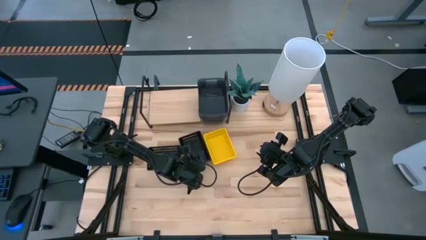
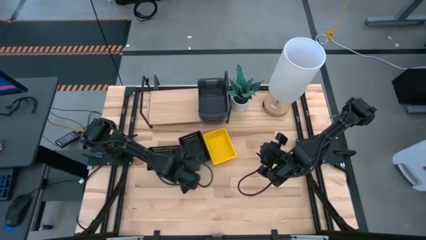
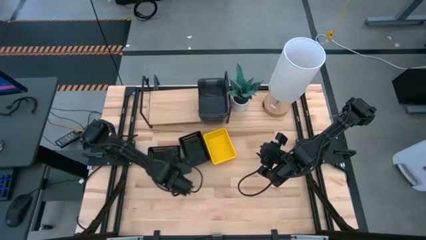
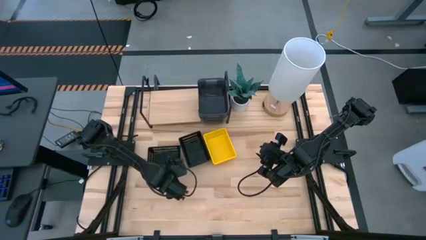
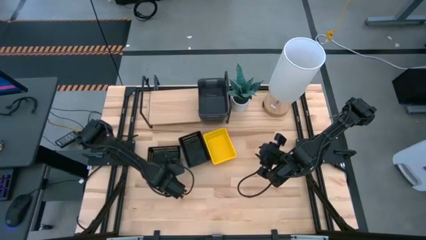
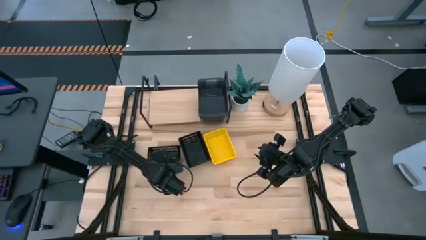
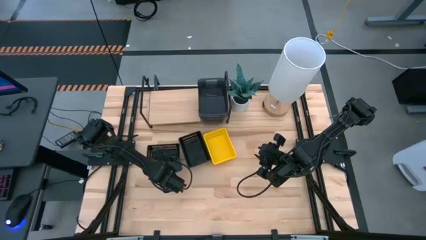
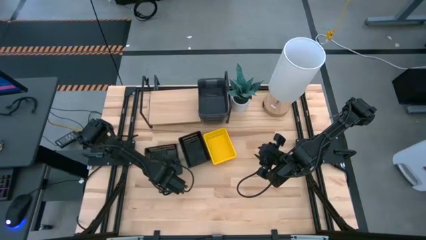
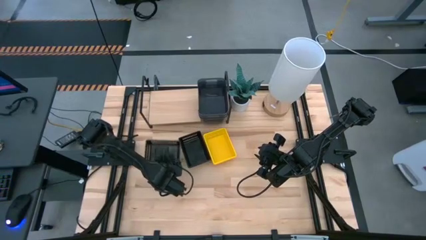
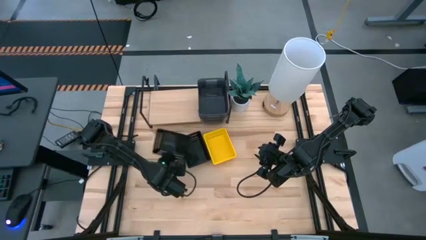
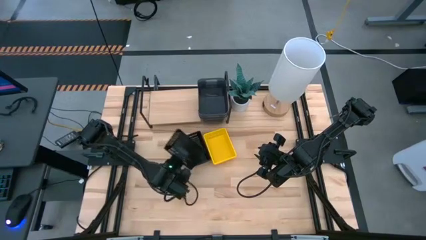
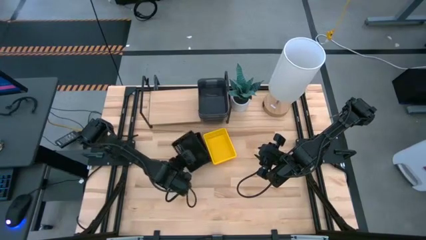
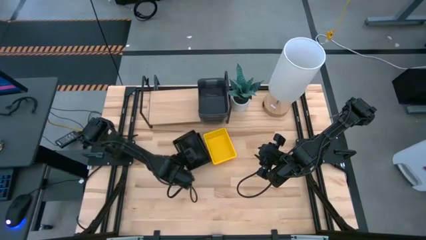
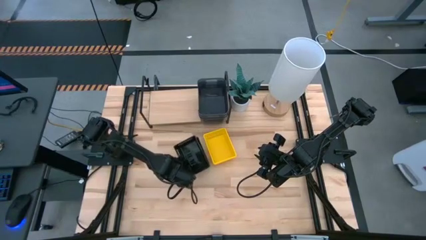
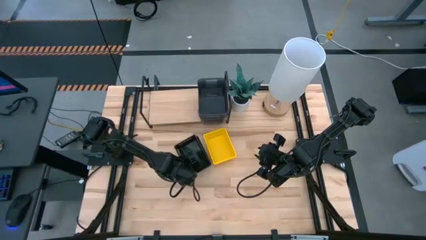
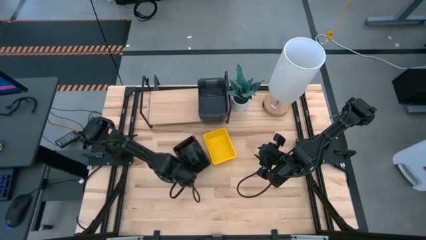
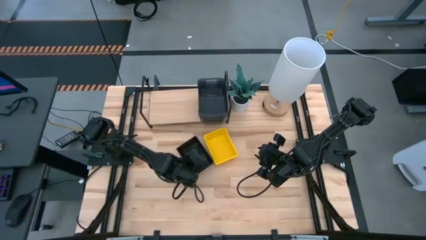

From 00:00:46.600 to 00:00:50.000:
Task: Stack baskets on shelf by color
Stack the left black bin into the stacked black bins

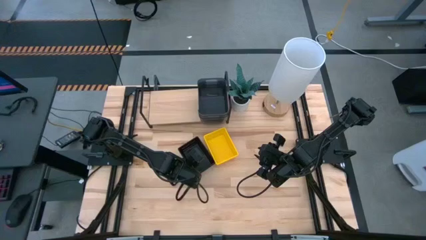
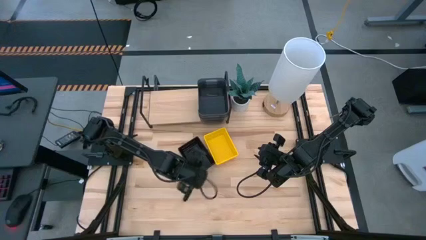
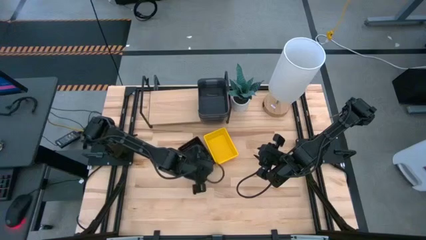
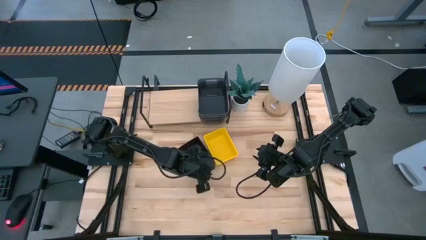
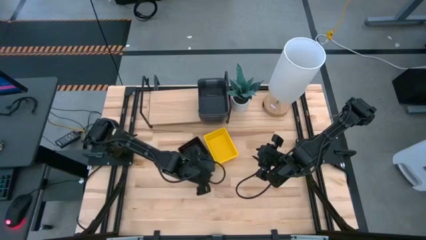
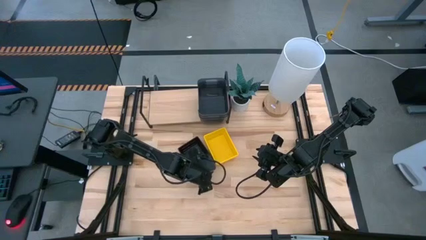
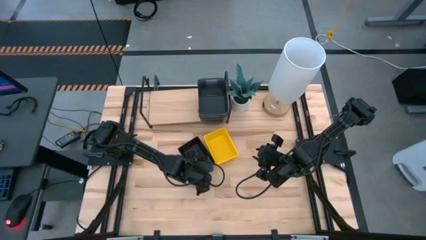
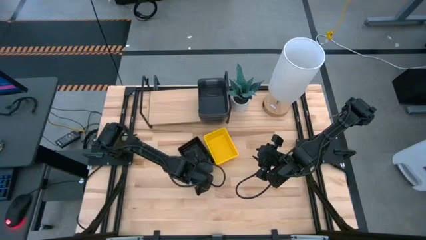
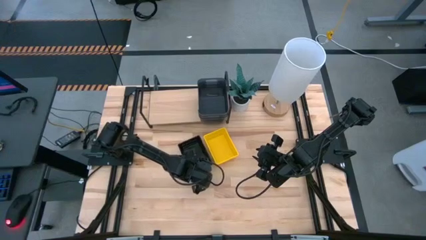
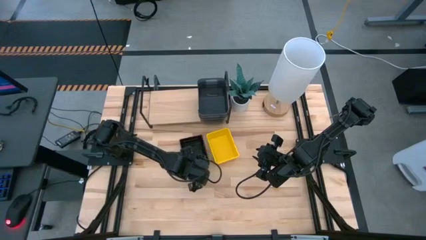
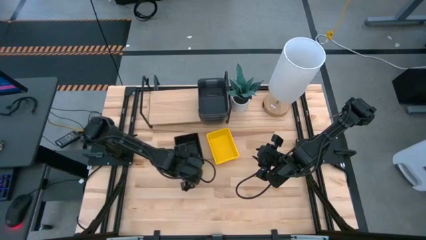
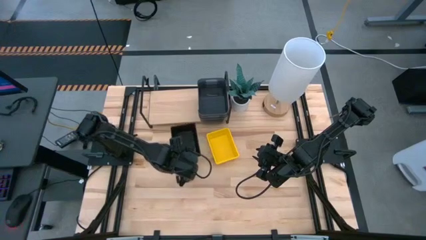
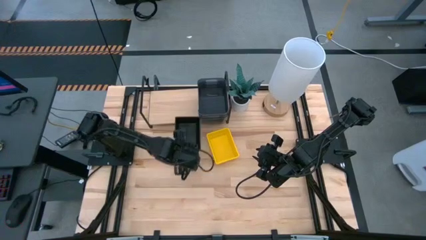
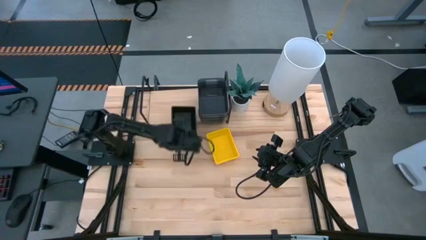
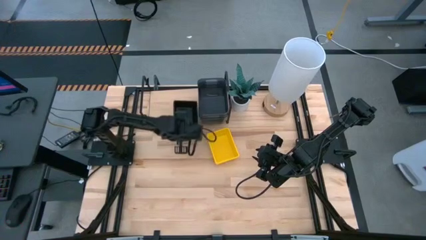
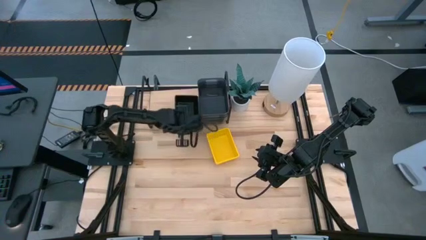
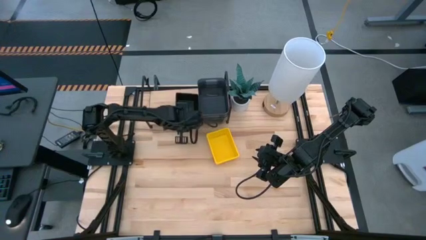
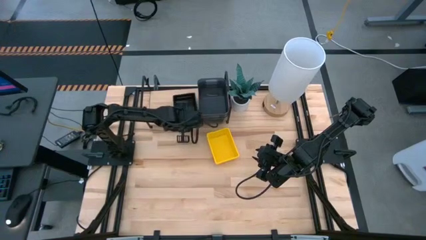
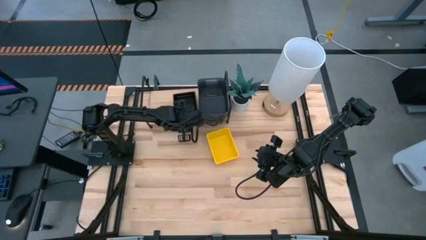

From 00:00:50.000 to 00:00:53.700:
Put the stacked black bins on the shelf

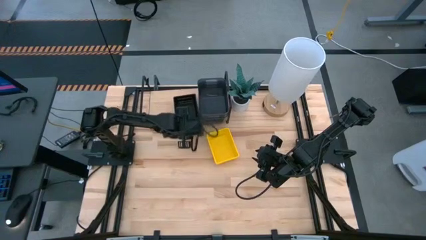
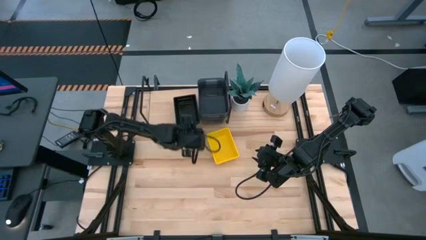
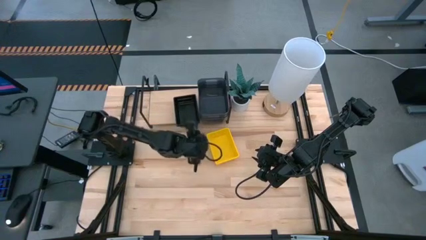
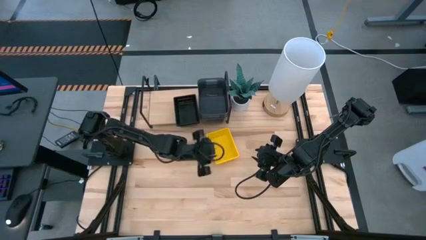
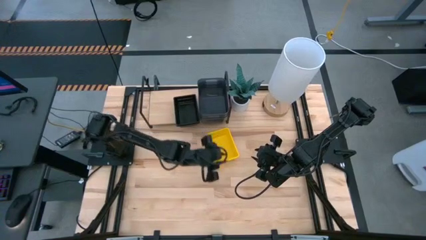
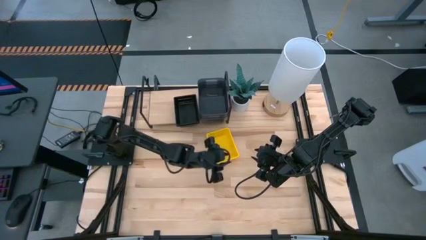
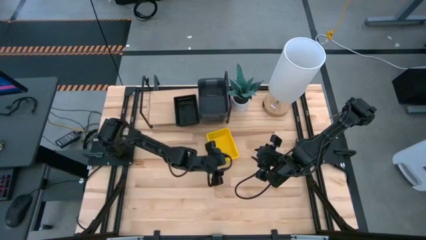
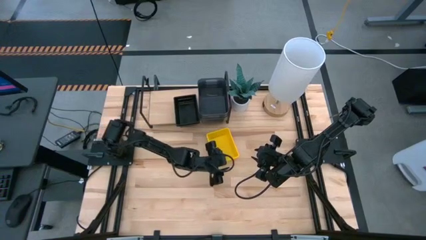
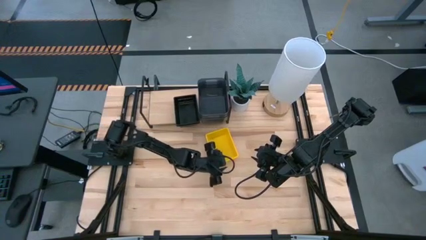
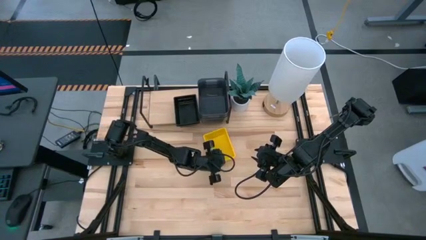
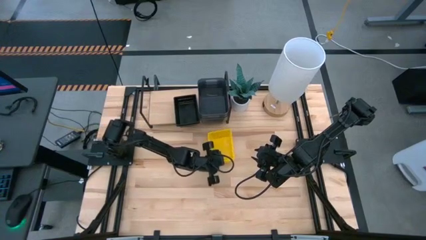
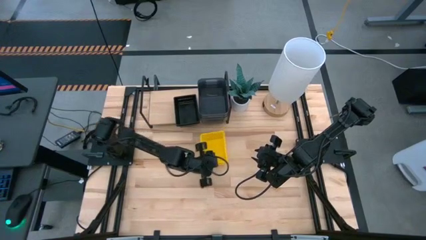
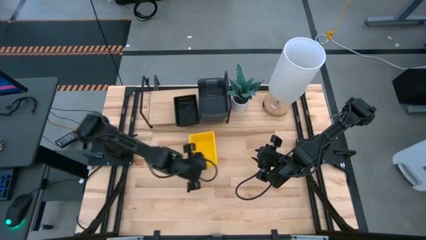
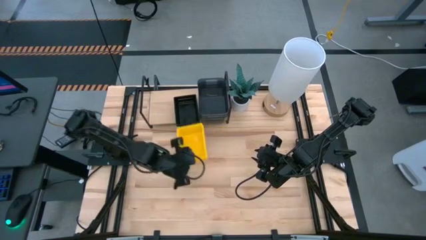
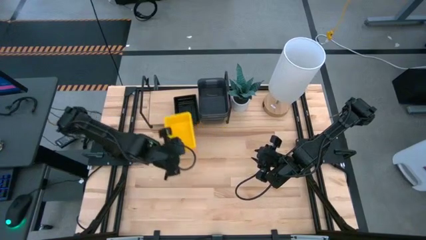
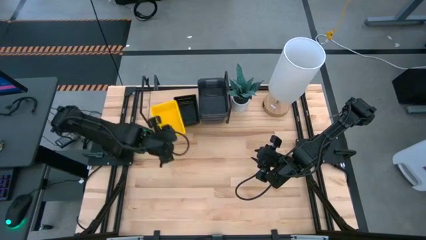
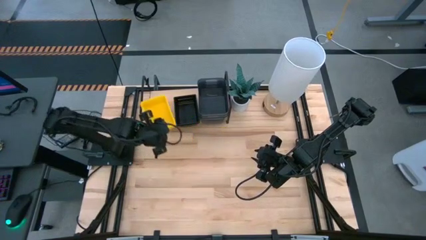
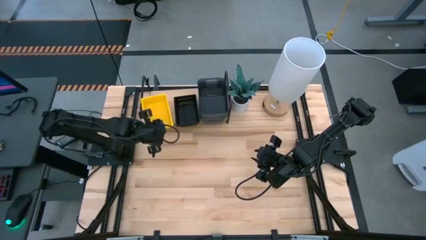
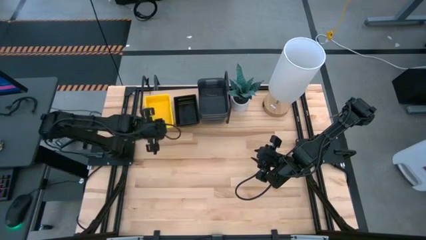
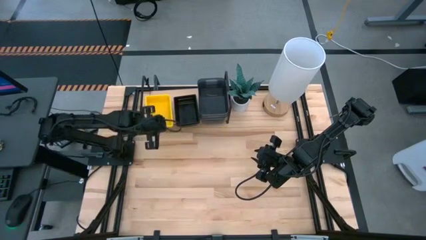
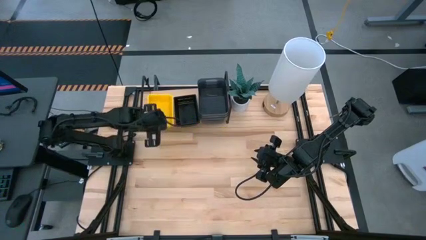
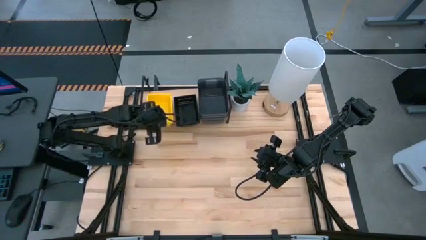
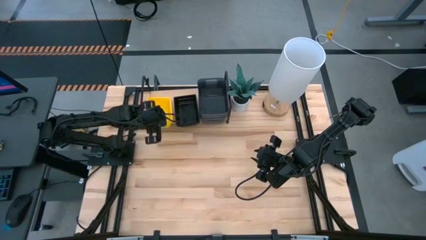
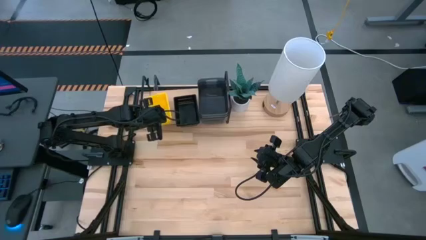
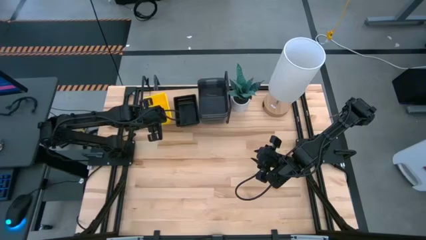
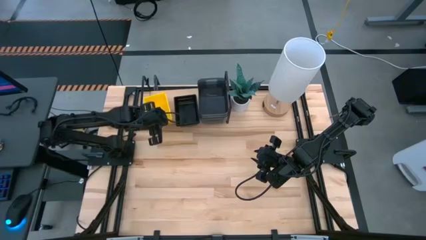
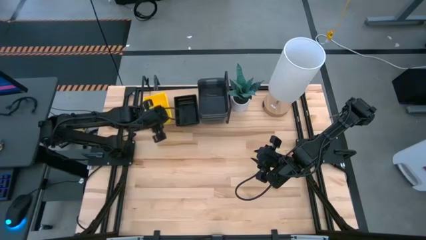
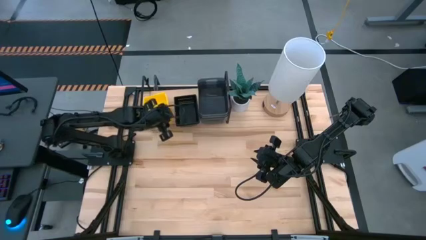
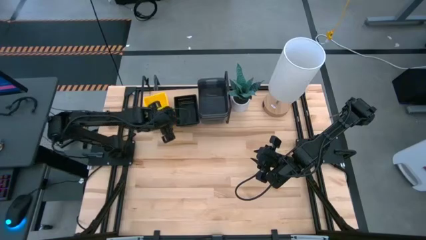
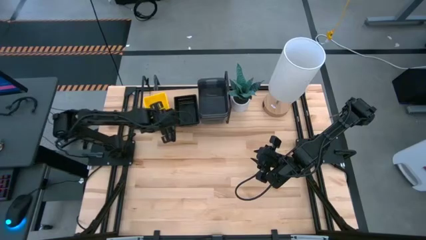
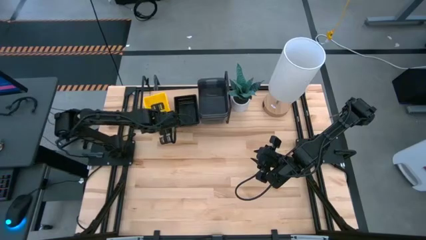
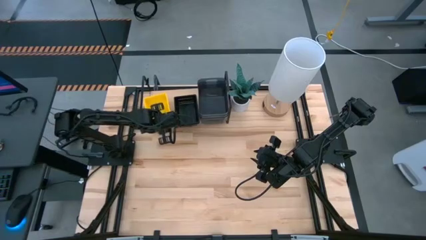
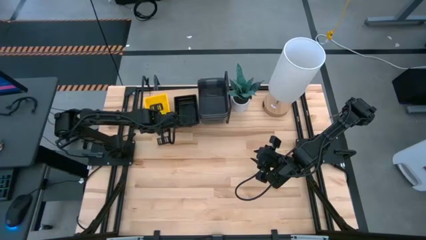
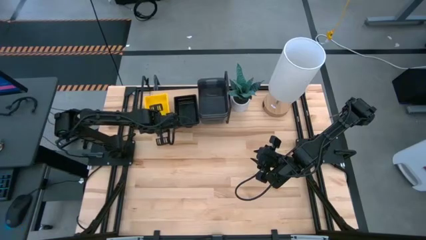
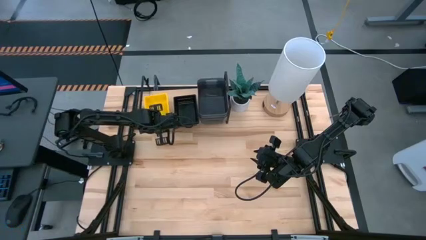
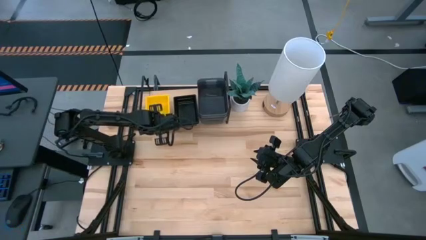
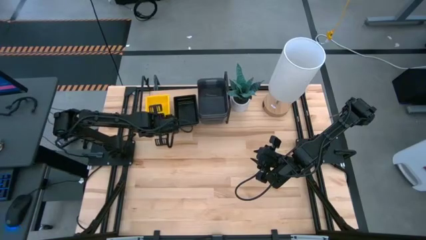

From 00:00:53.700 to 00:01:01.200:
Put the stacked yellow bins on the shelf

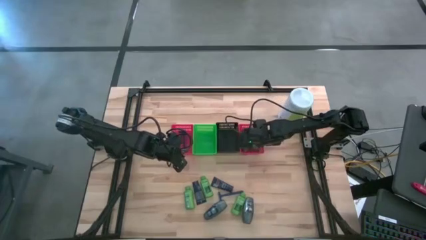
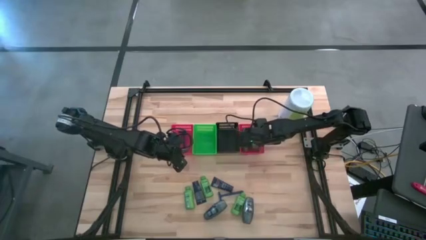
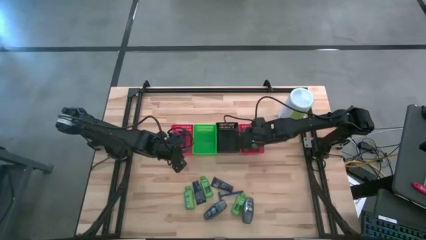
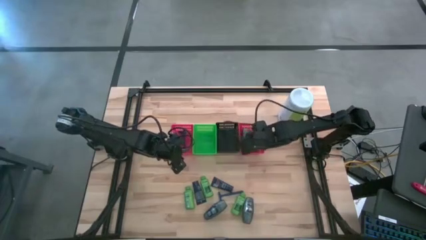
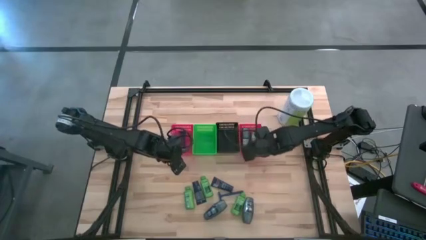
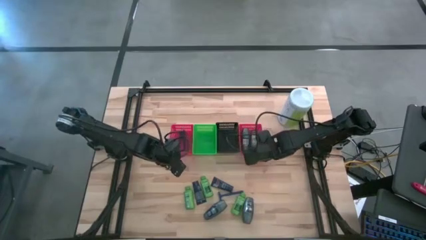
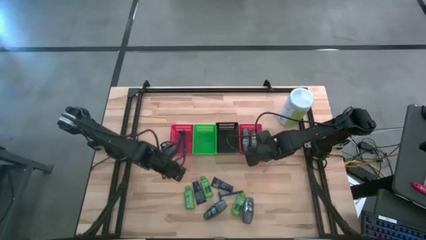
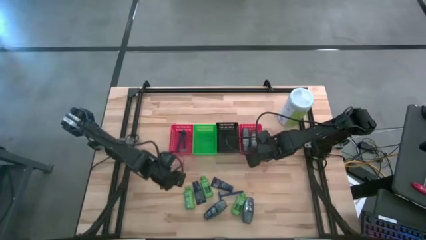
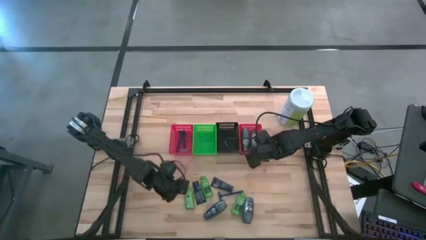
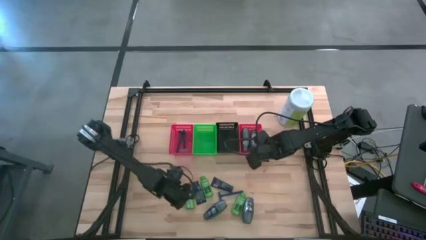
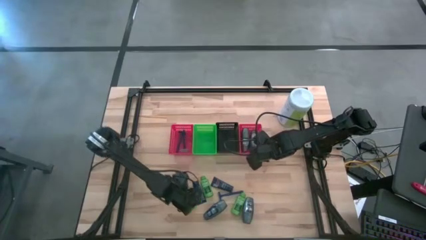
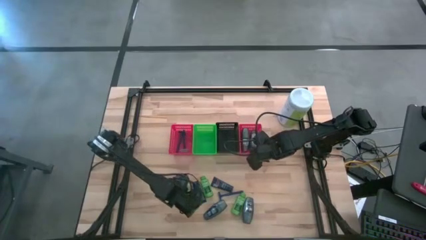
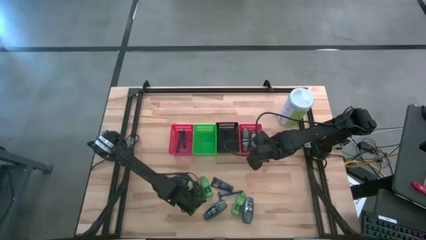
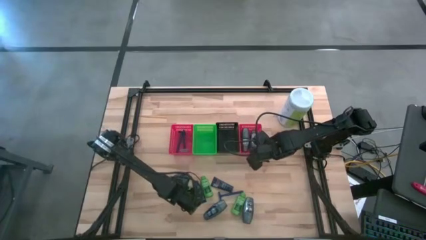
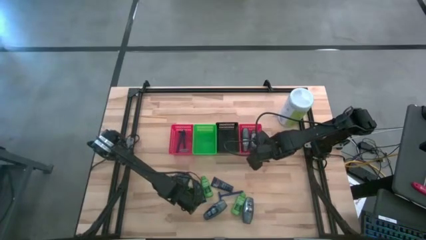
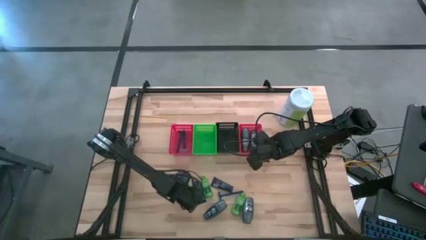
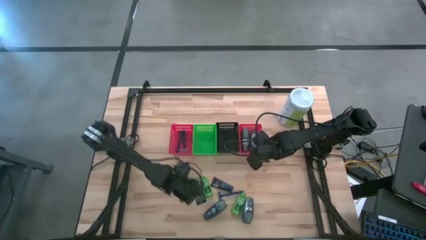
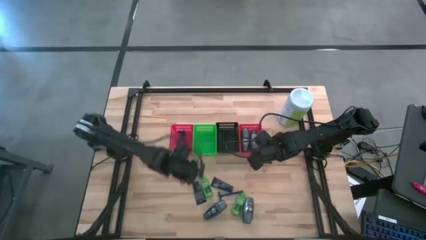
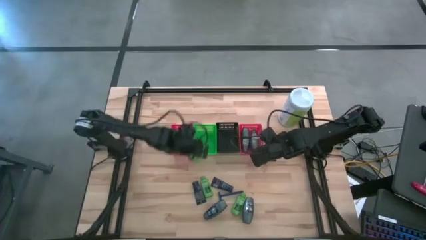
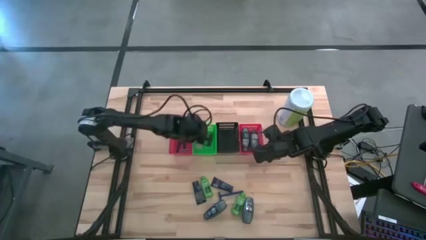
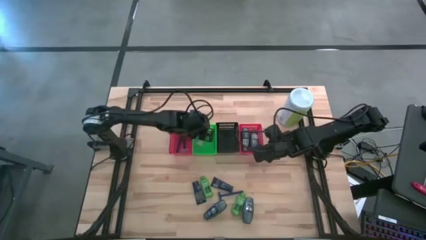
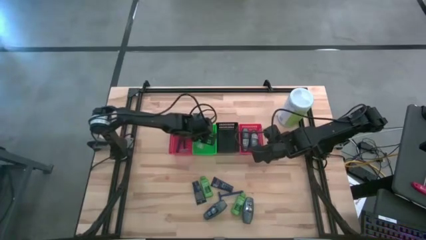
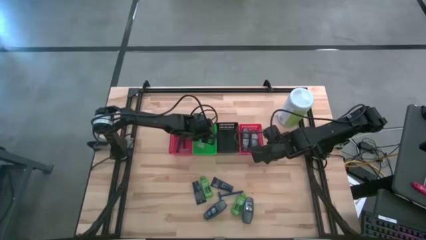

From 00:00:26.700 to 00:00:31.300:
Task: Pick & Place Travel size toiletries
Put the middle green shampoo into the green bin
